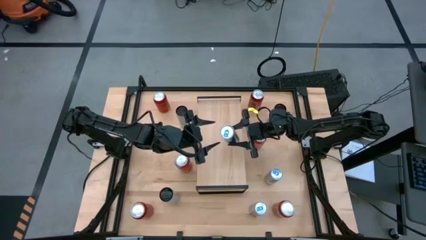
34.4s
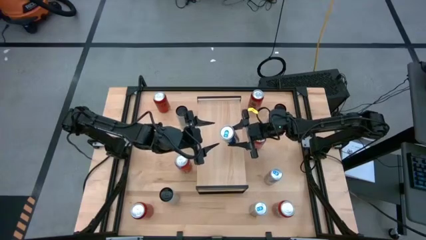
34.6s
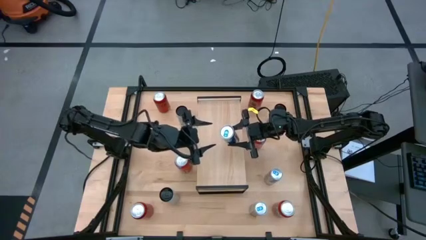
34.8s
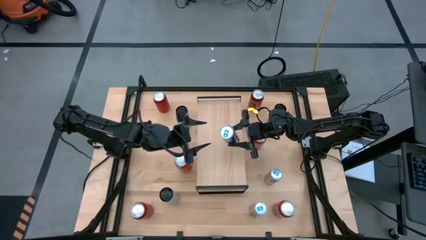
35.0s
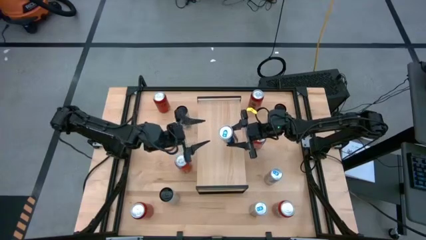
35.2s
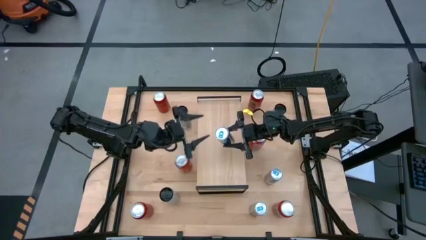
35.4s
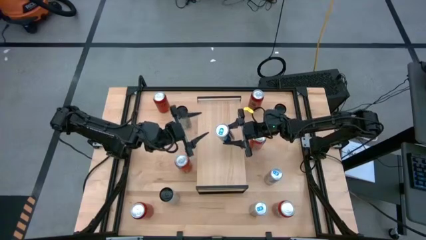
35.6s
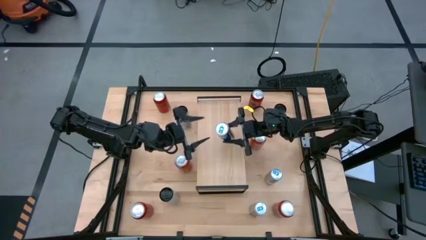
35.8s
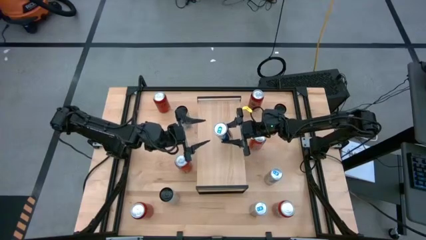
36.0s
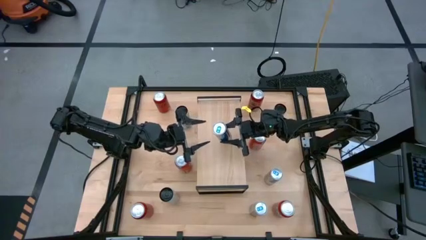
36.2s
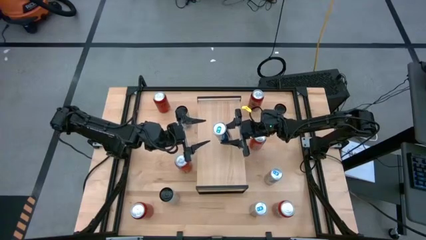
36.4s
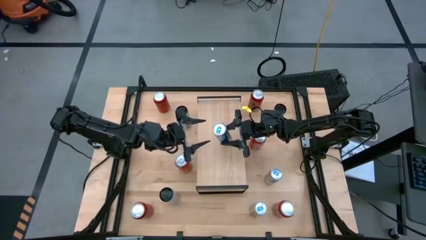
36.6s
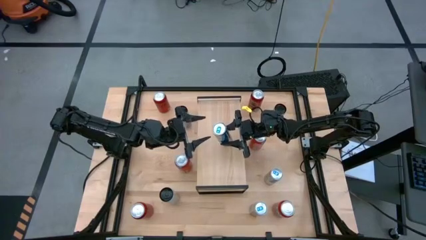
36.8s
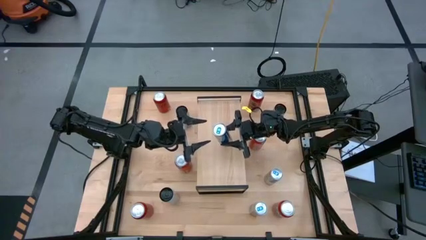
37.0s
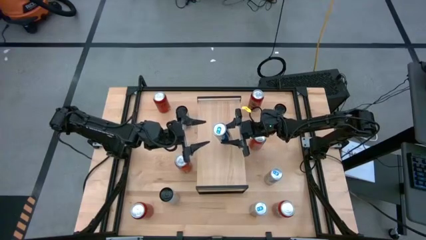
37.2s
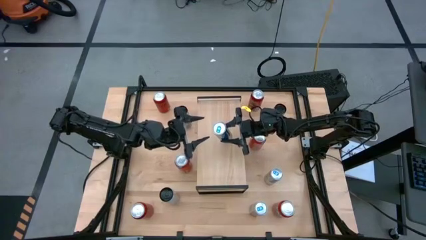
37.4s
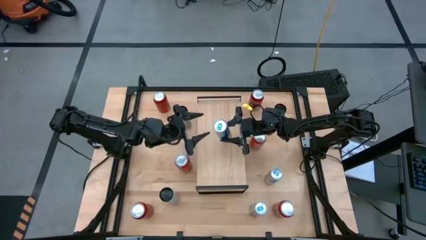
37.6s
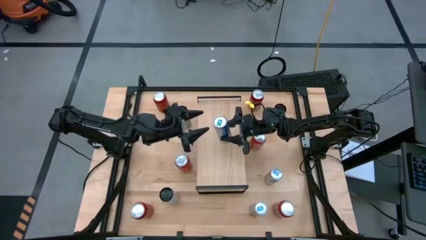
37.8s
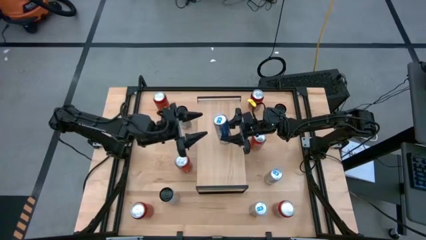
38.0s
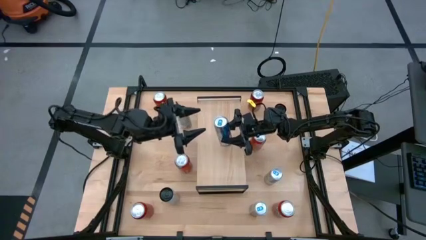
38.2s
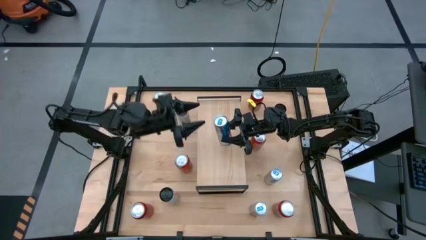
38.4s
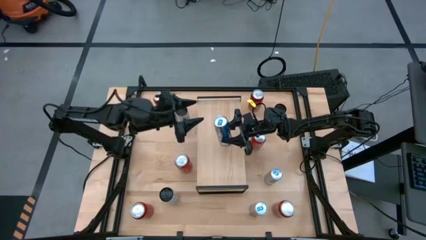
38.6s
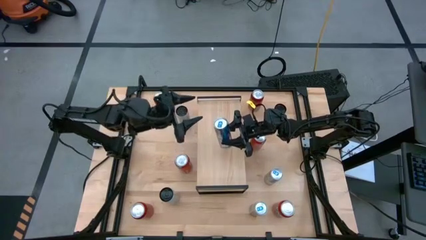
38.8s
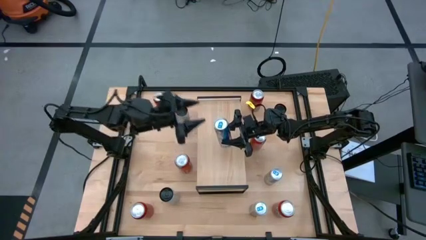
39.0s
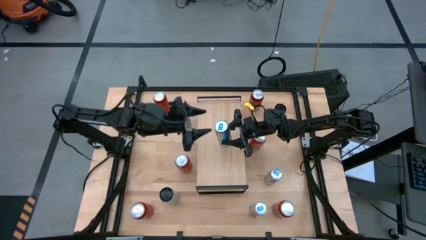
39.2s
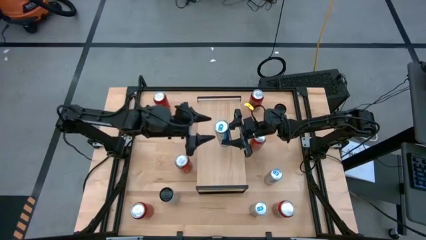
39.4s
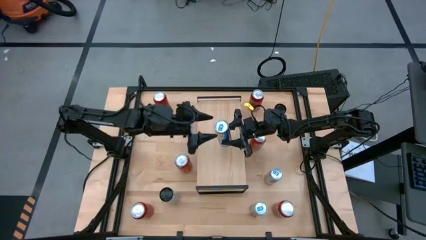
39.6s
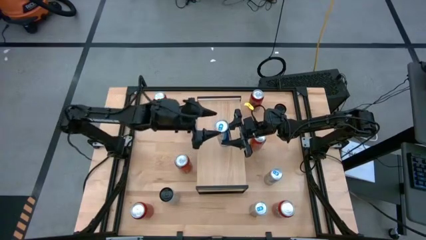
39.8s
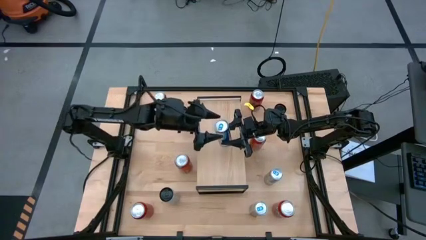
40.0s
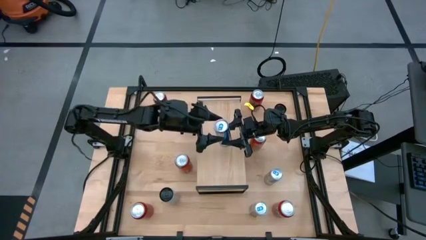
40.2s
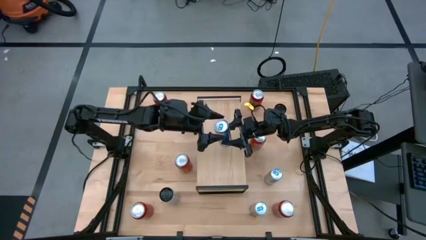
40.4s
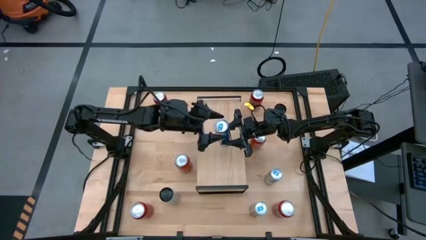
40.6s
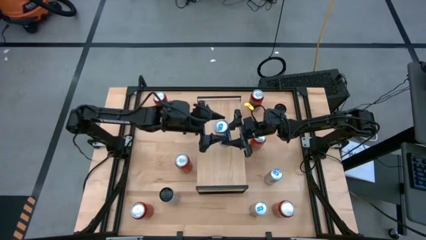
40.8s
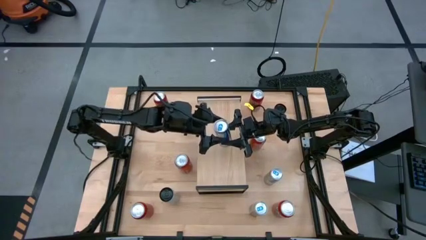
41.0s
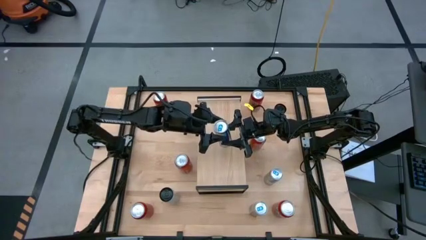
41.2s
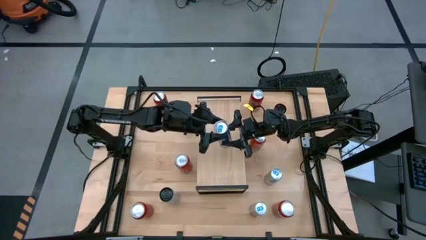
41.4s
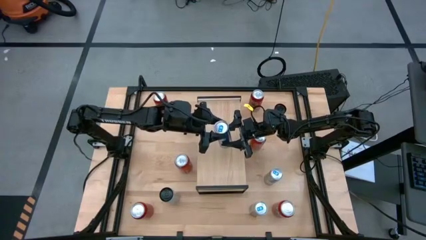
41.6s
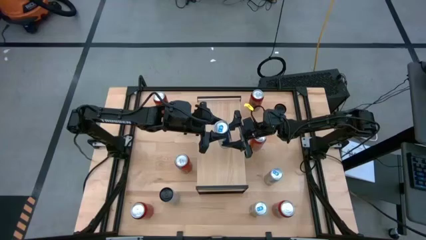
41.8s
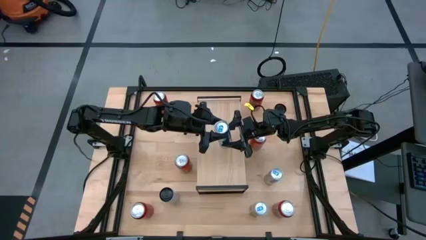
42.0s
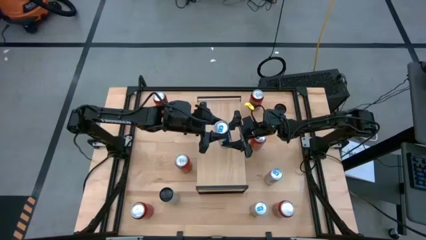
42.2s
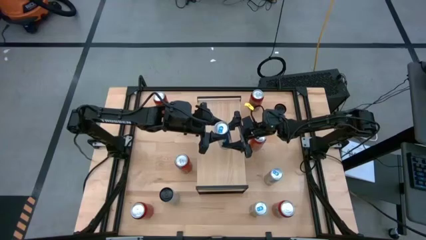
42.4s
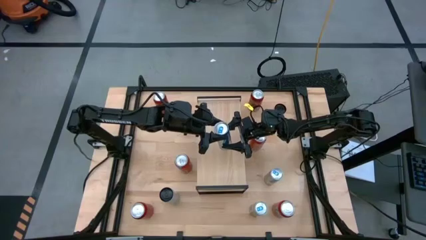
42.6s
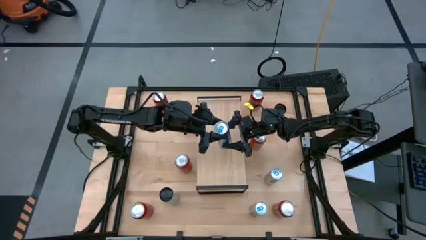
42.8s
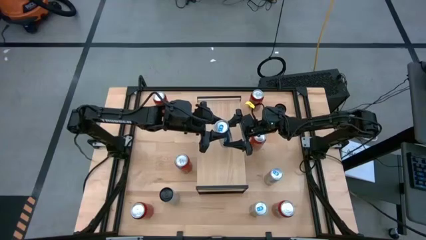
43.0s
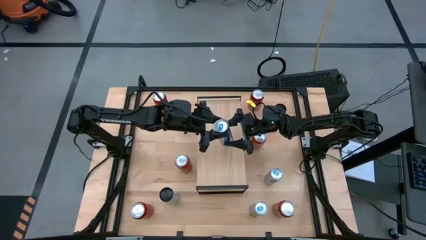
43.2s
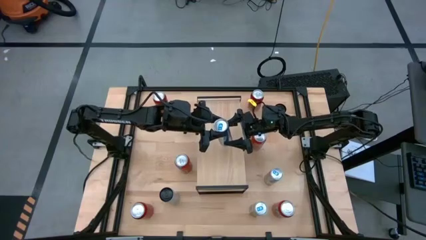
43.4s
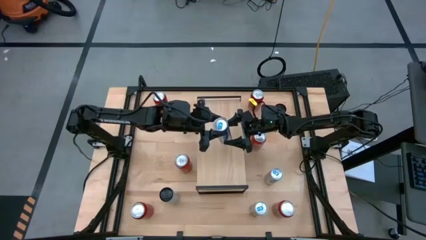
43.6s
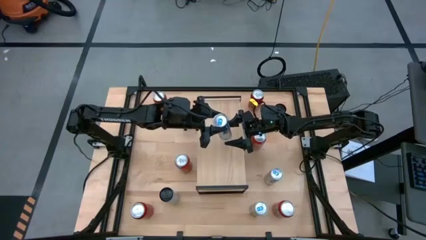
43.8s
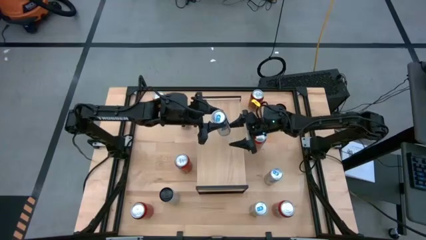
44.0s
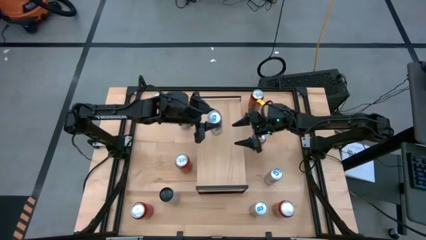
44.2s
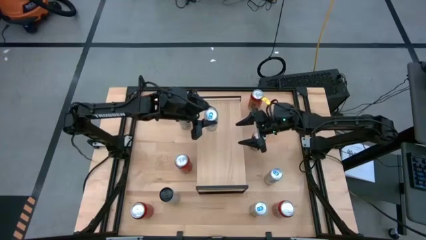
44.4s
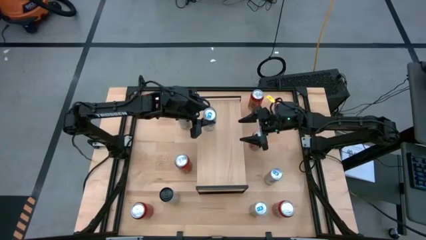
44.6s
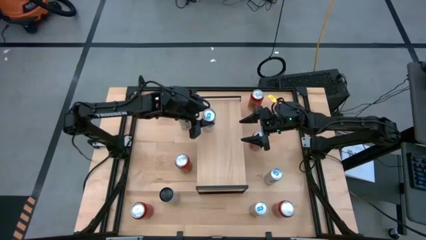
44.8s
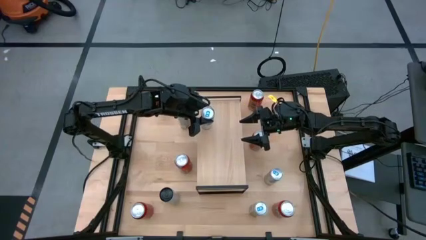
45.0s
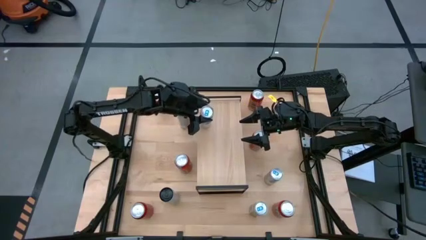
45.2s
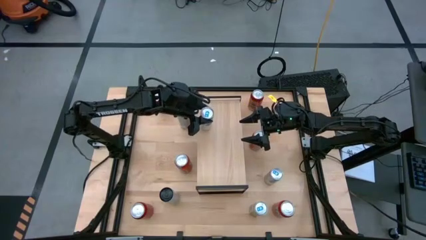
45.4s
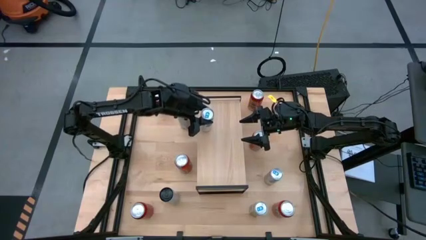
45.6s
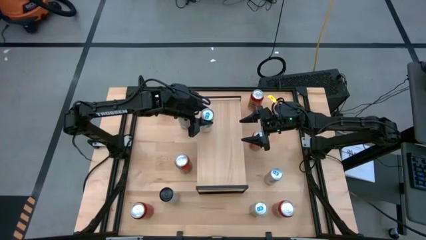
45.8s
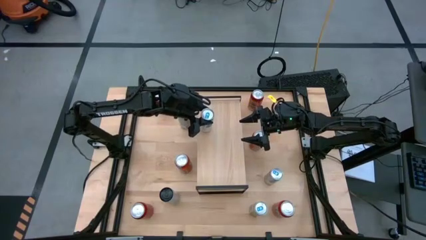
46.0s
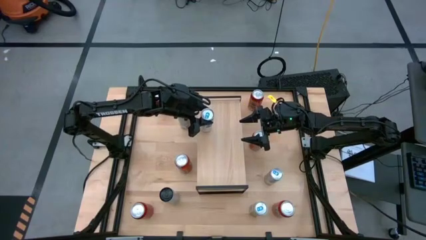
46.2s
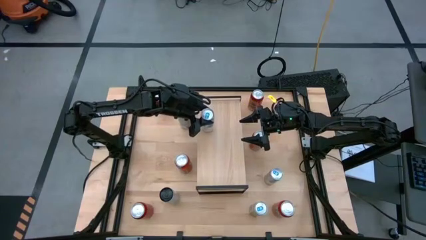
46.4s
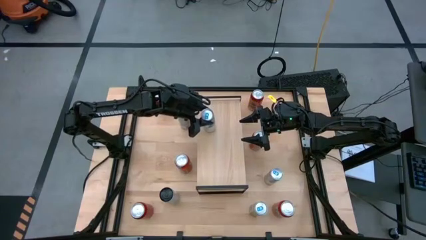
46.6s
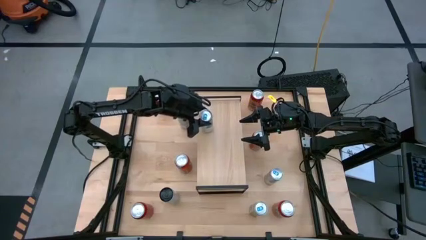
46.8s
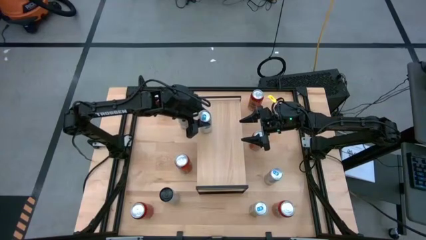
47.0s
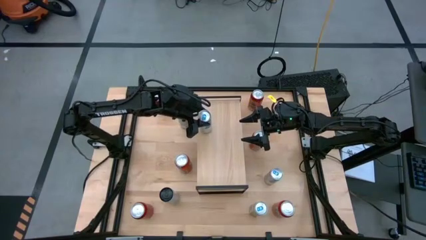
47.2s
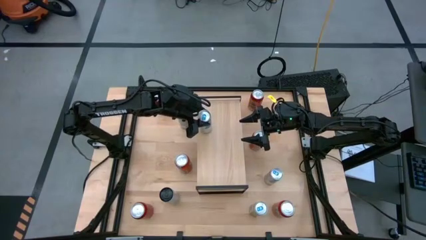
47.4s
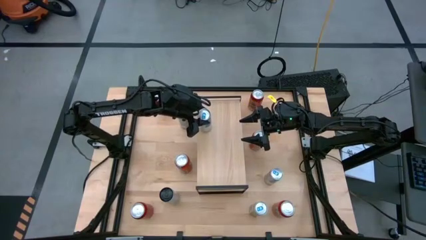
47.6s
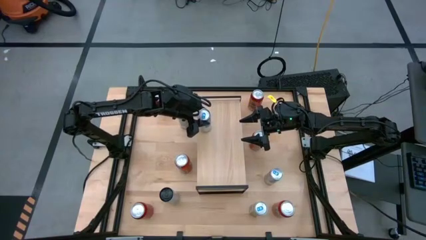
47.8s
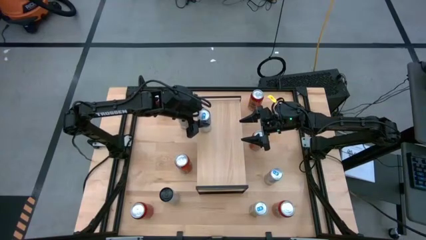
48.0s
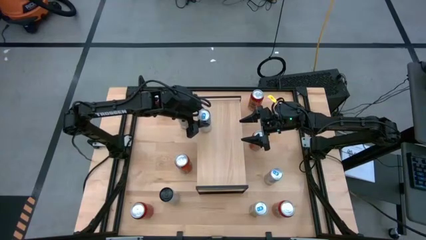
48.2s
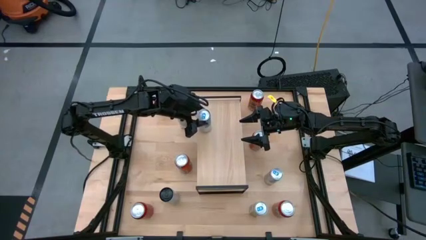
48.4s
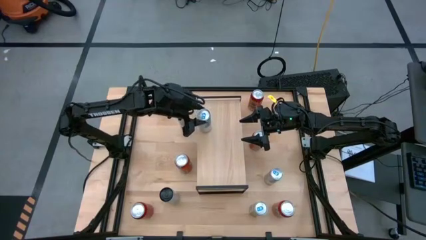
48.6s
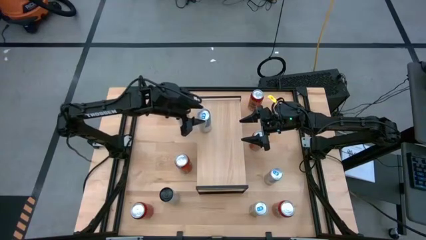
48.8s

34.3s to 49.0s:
Task: Place canned beverage on shelf
Put the top left blue soda can on the shelf
